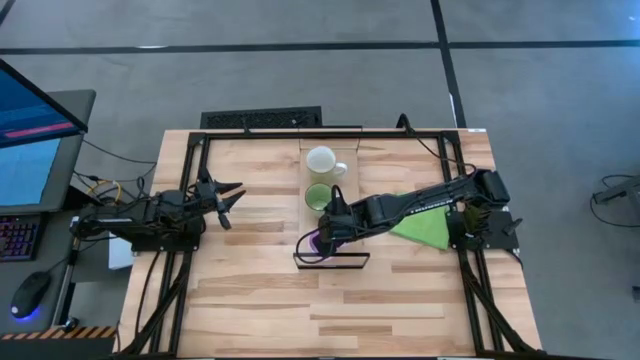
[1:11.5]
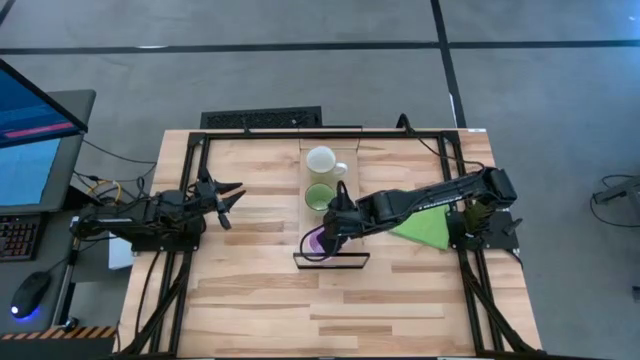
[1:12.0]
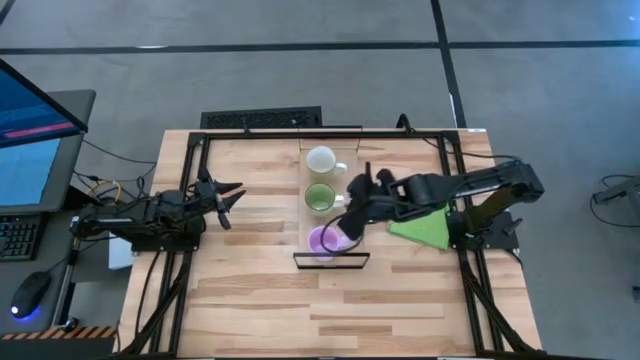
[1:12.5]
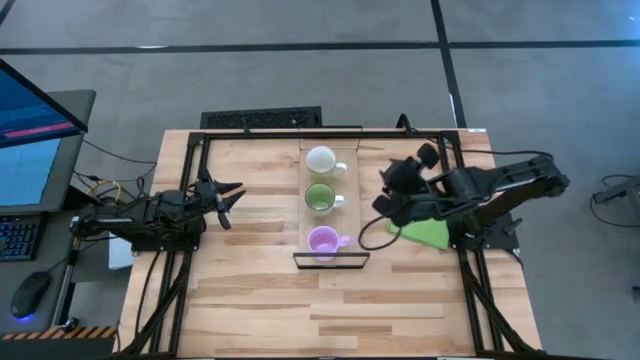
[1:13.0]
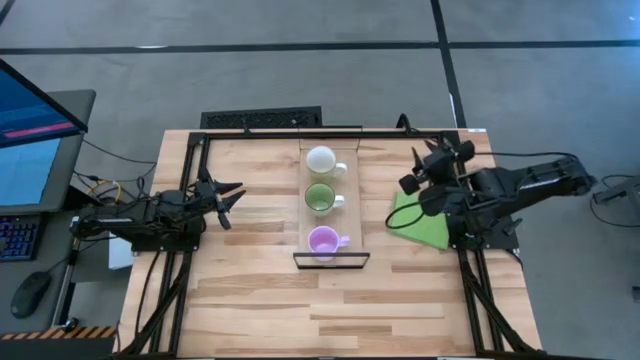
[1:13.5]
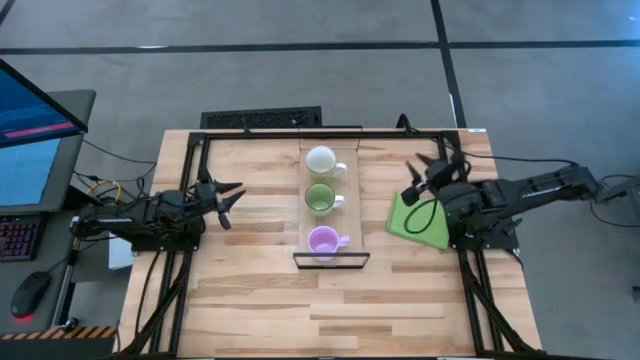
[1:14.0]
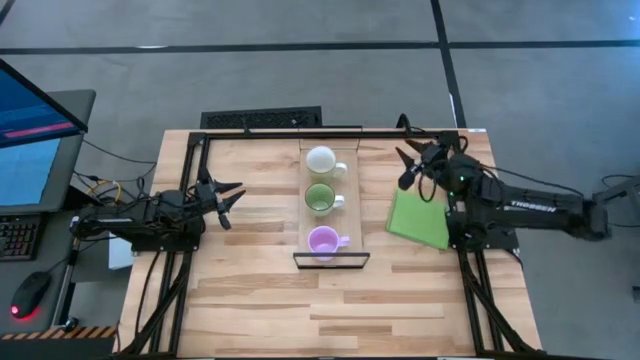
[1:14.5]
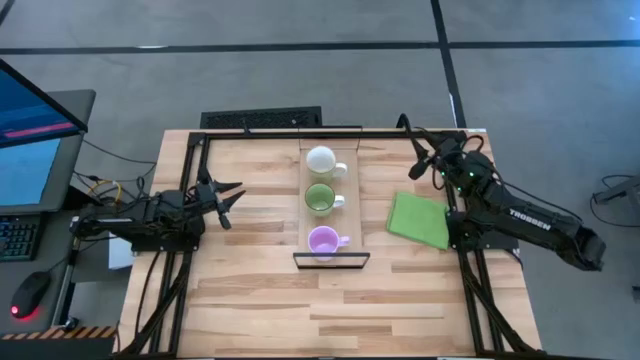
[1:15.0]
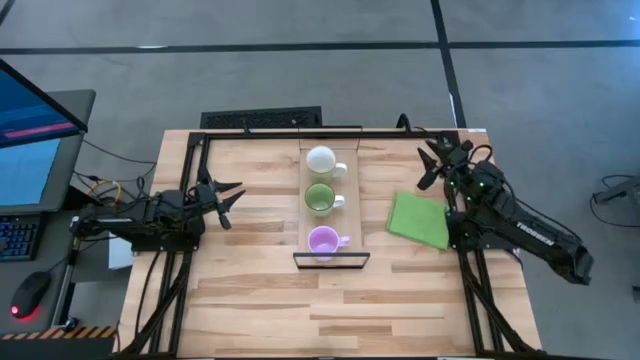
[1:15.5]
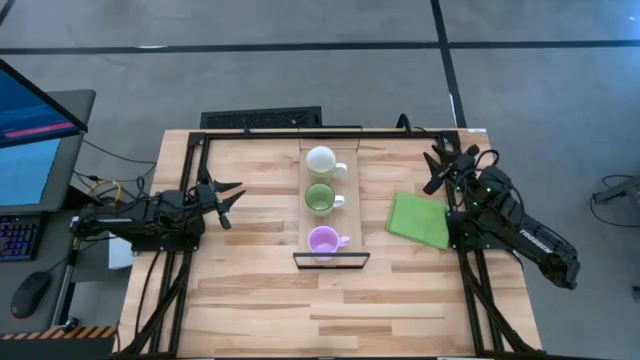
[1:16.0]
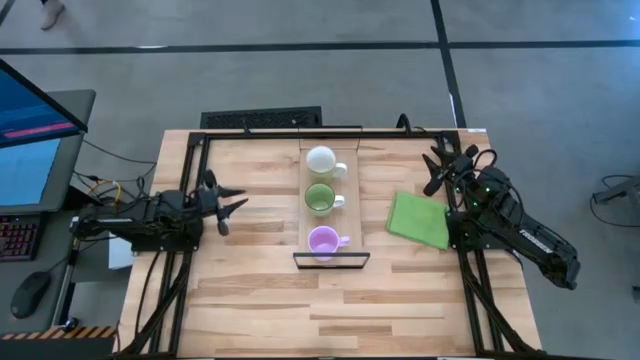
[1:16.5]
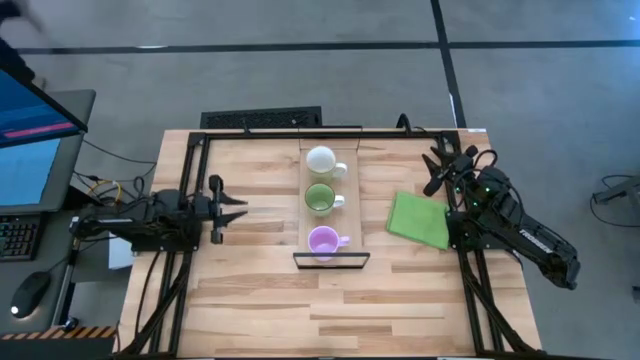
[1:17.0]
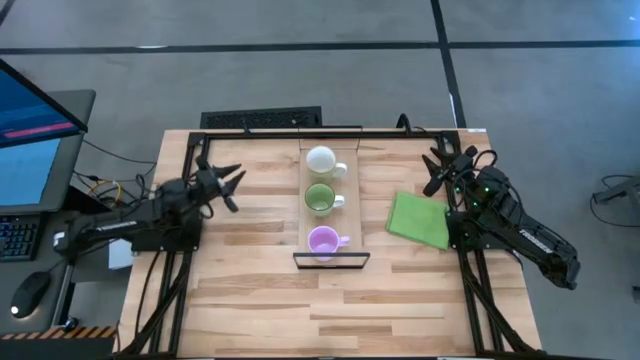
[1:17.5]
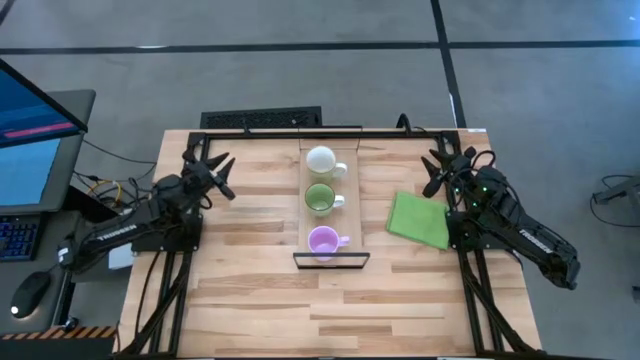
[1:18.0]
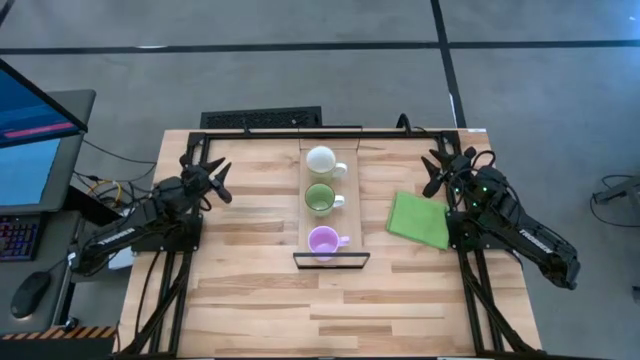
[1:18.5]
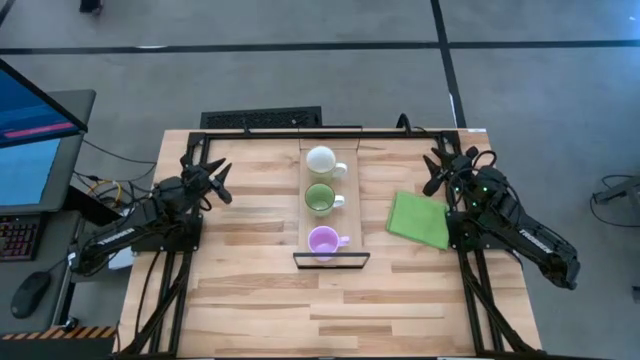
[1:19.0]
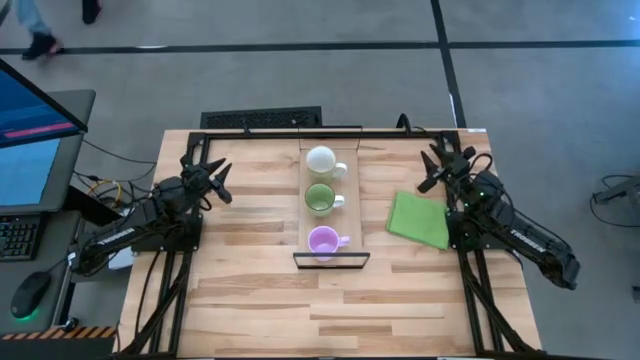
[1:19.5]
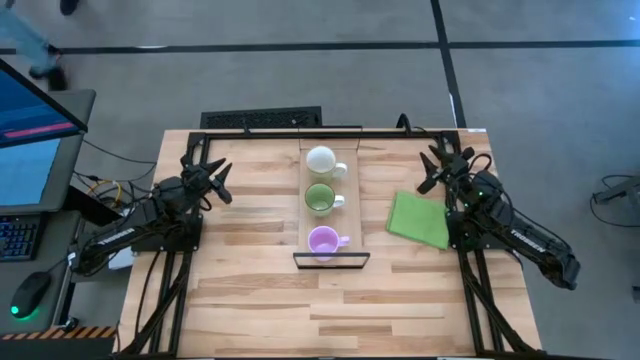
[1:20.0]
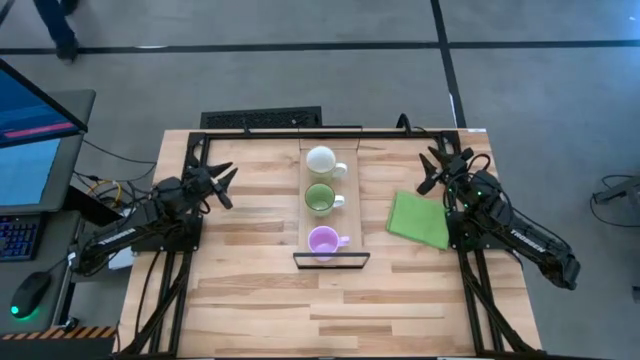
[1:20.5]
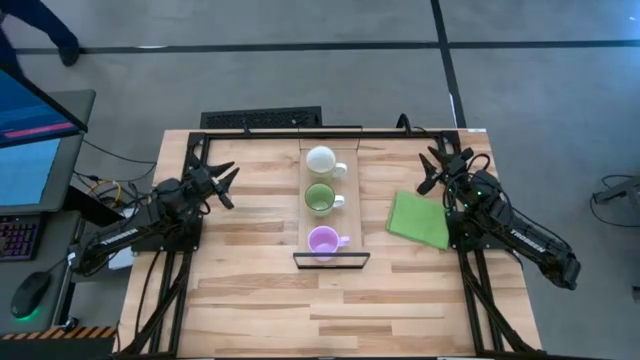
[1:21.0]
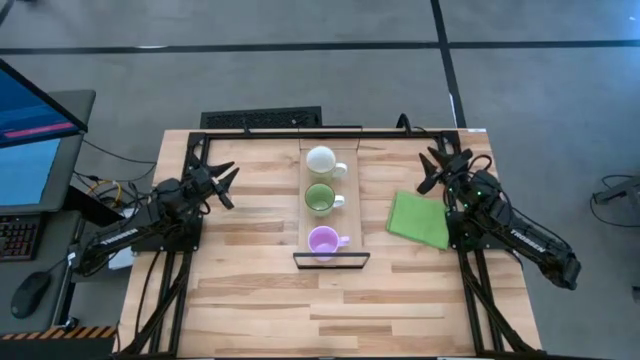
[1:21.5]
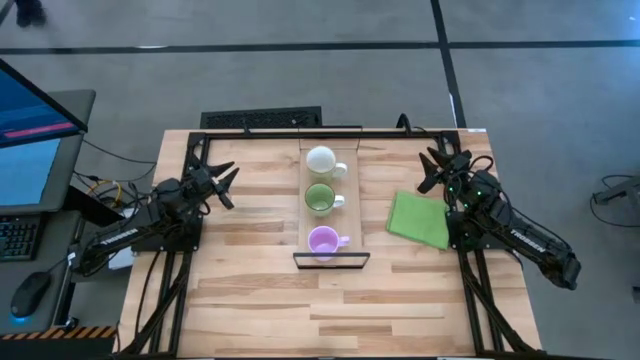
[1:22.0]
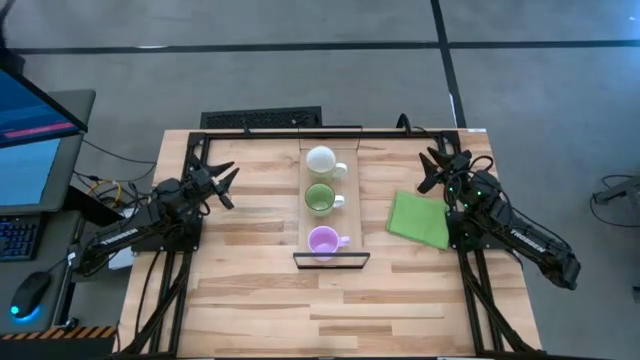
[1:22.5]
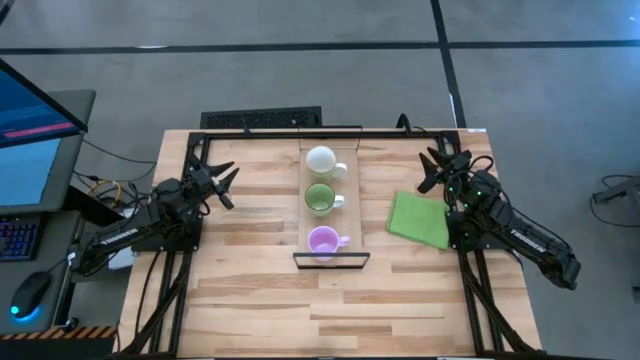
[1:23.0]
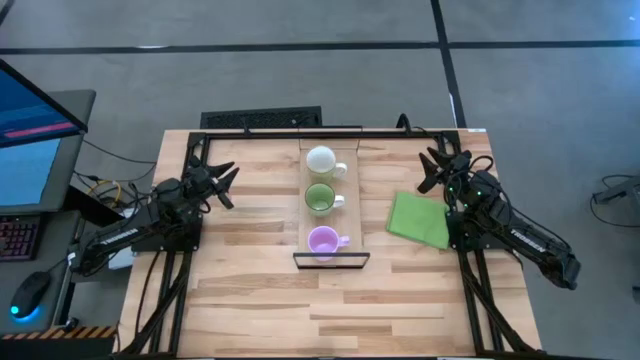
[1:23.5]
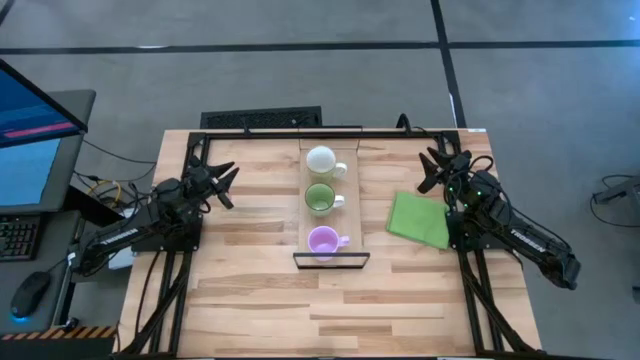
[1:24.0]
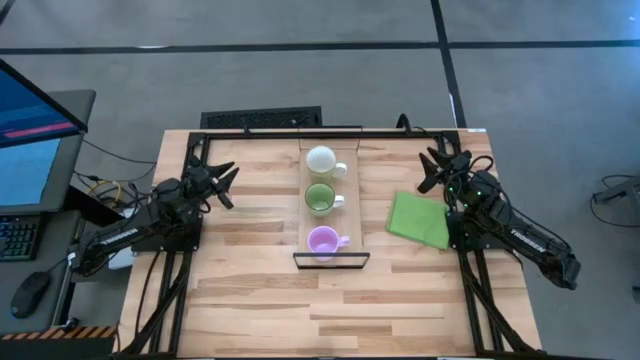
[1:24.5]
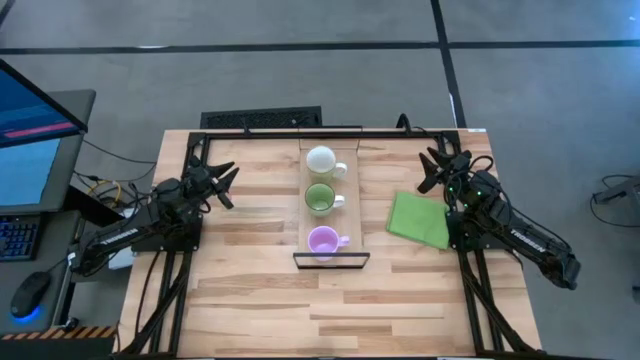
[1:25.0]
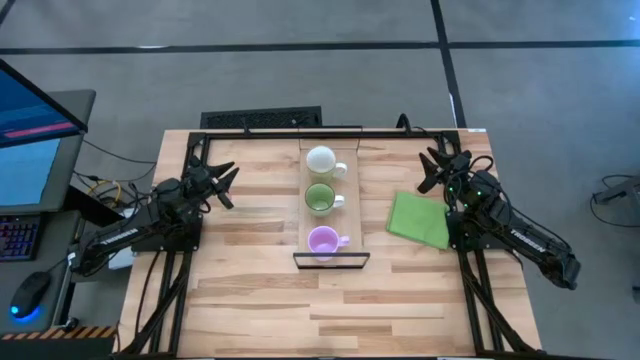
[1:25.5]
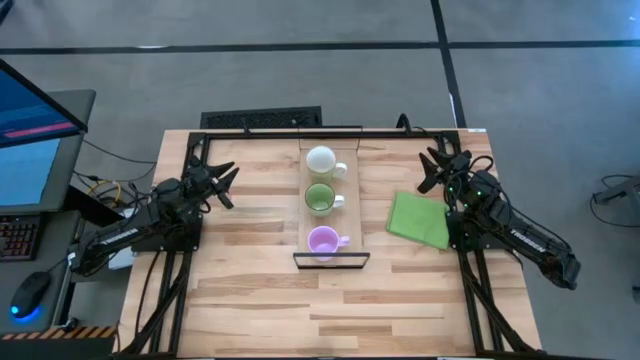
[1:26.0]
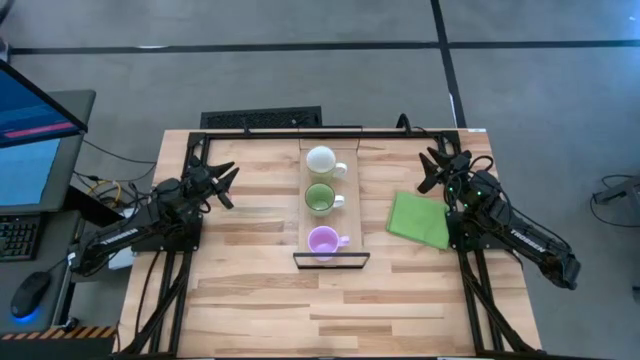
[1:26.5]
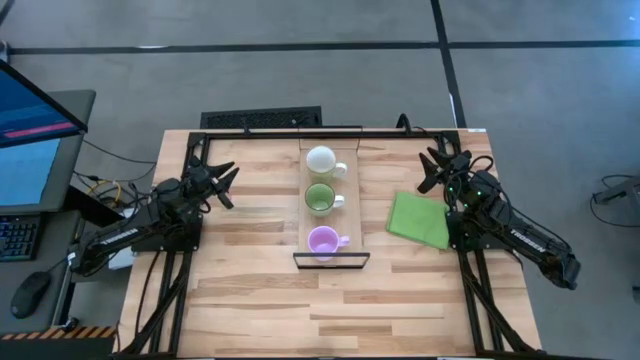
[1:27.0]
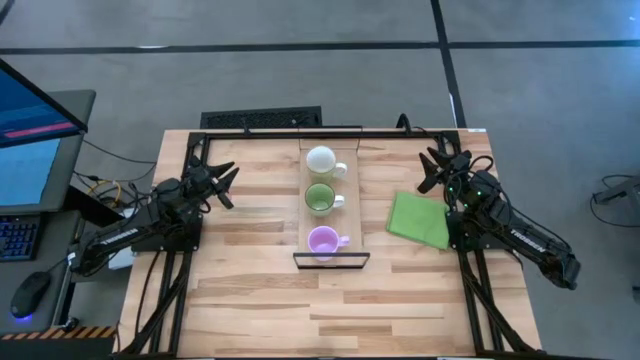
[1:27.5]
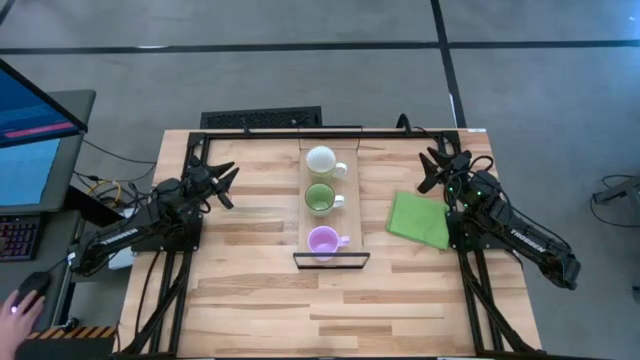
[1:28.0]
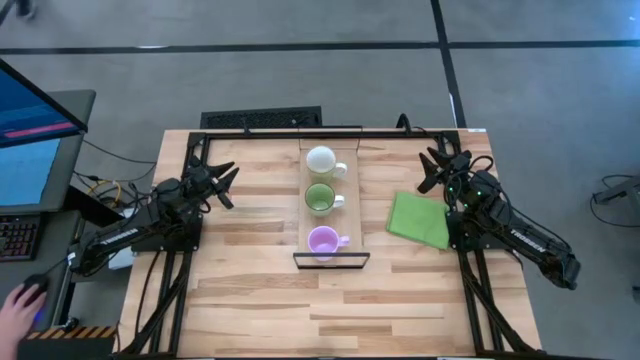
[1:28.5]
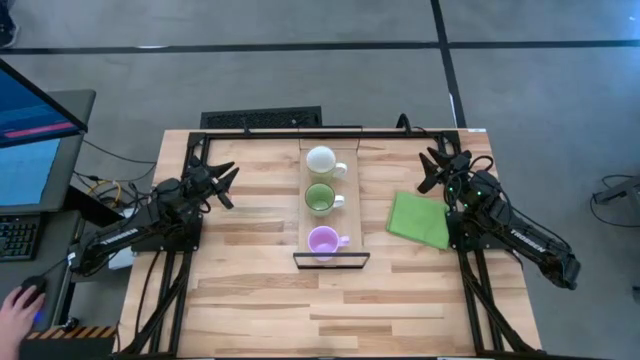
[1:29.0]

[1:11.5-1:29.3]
Task: Stack small to large cups/mugs on shelf
Return to Home Position

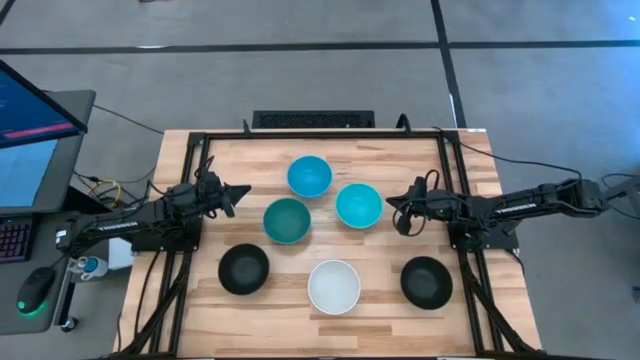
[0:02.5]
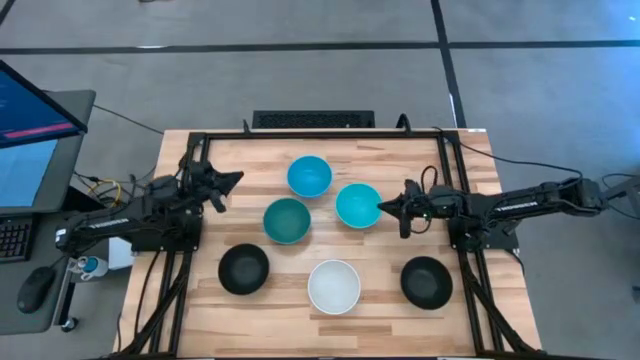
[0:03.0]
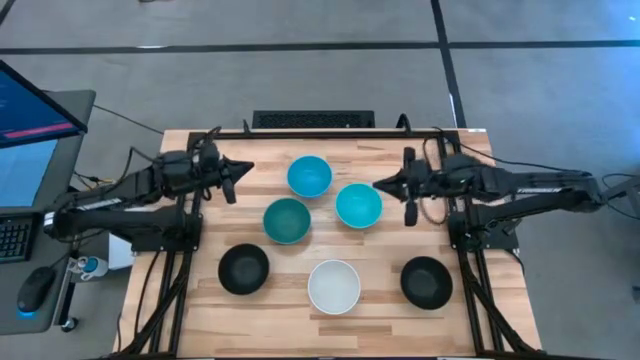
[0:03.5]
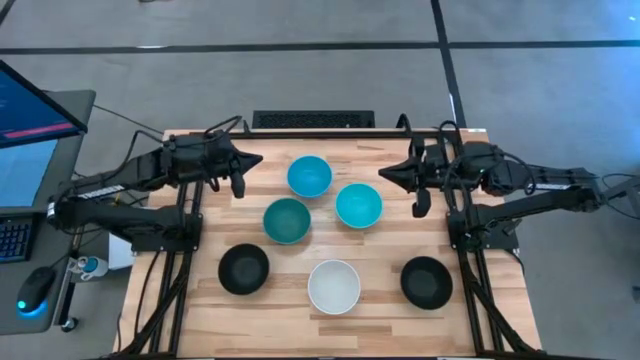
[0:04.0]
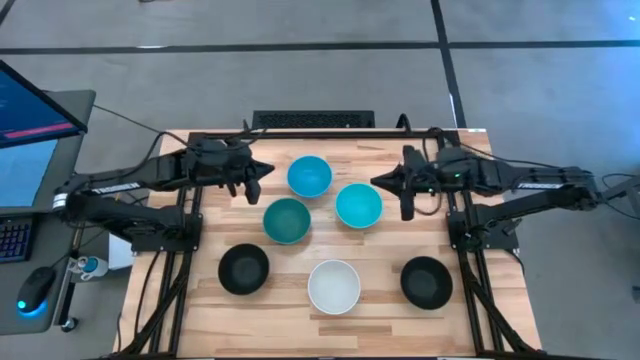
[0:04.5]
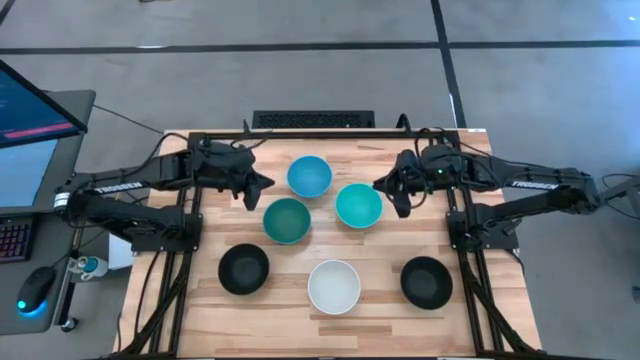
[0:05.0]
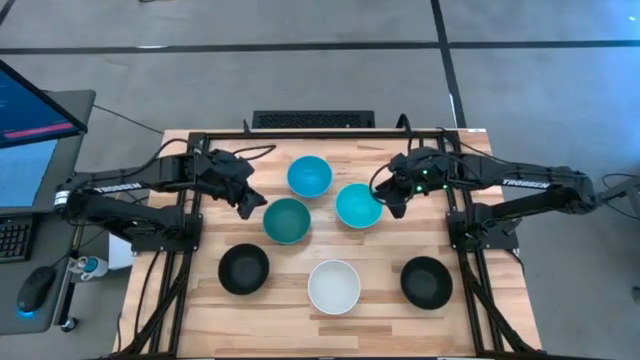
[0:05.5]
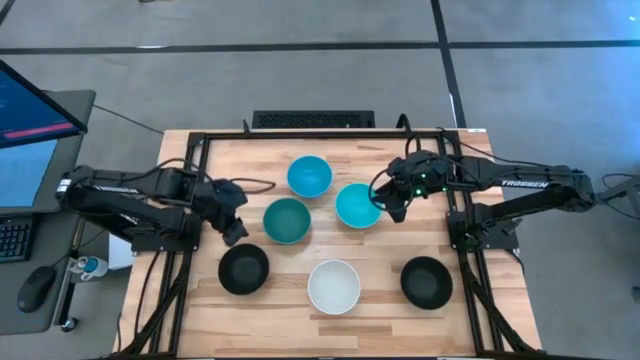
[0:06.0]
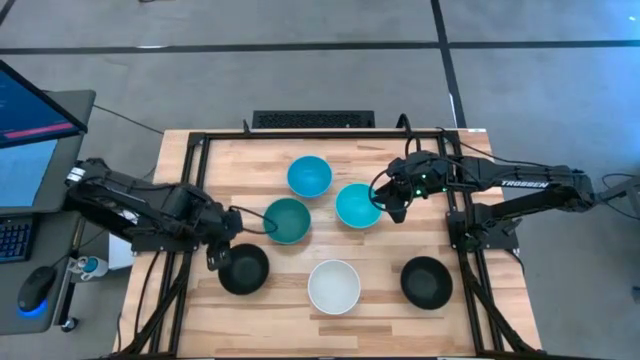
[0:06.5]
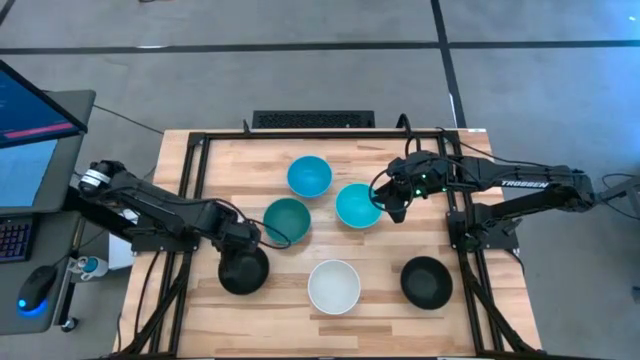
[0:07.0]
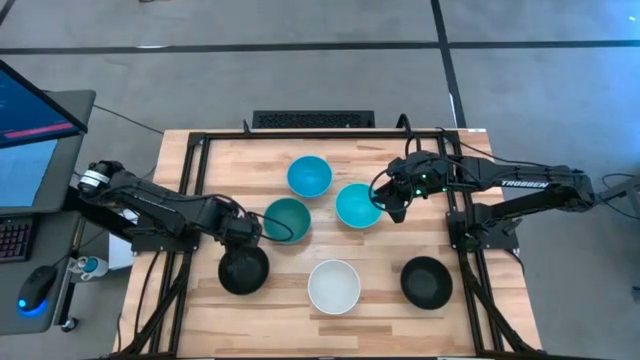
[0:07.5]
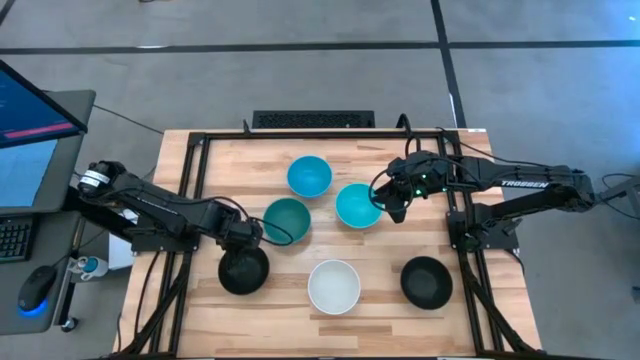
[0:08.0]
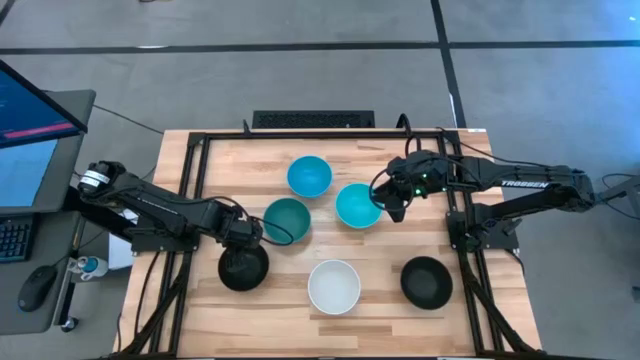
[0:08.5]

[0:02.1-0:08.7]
Task: Nest bowls inside each other
Stack the left black bowl on the green bowl
